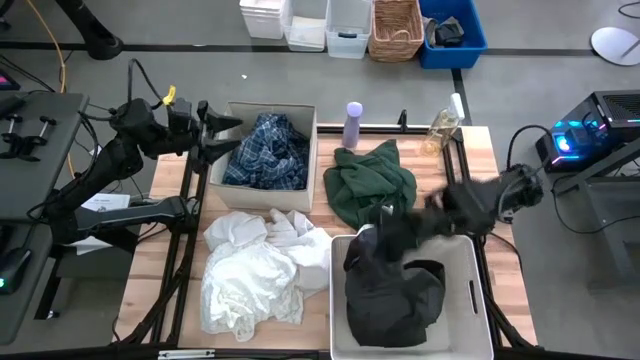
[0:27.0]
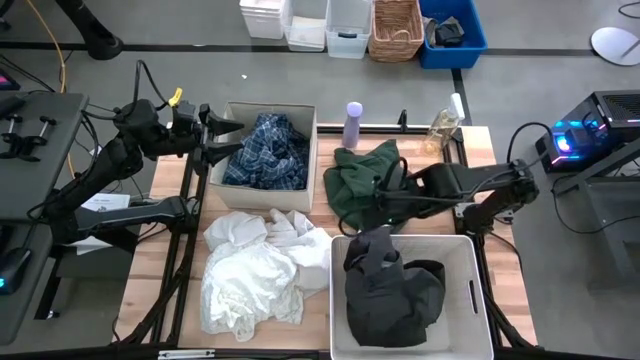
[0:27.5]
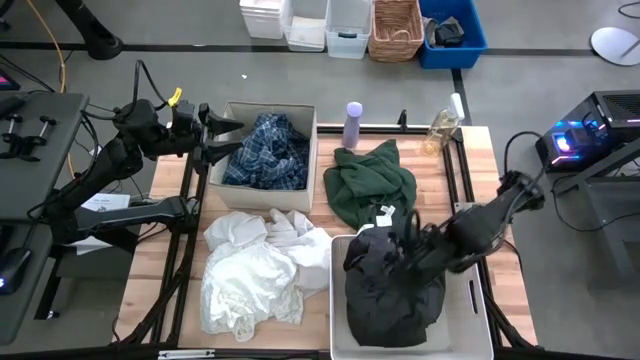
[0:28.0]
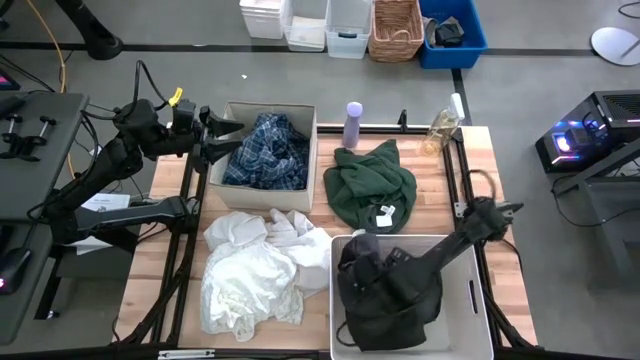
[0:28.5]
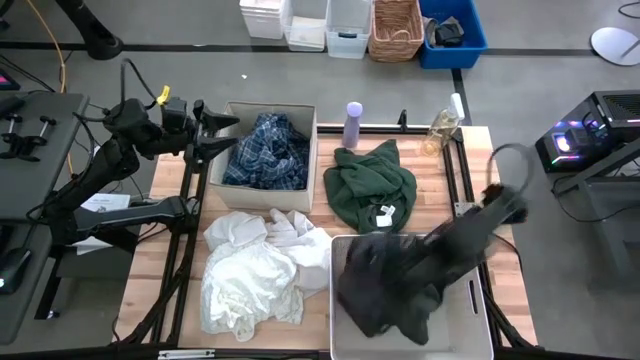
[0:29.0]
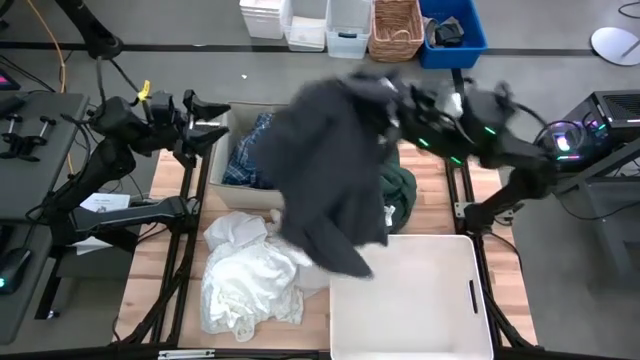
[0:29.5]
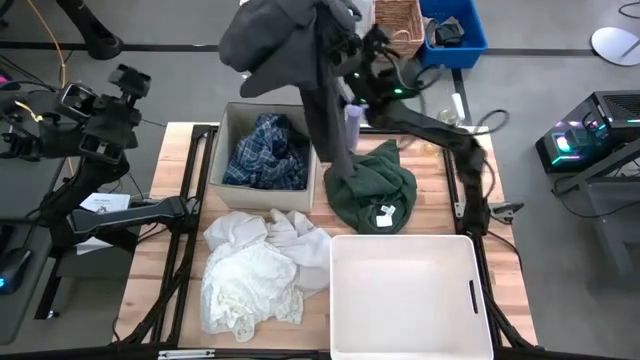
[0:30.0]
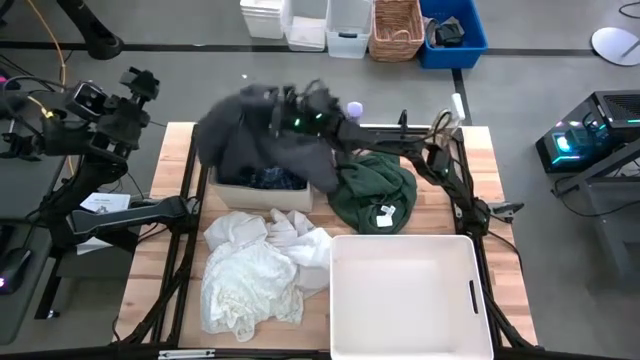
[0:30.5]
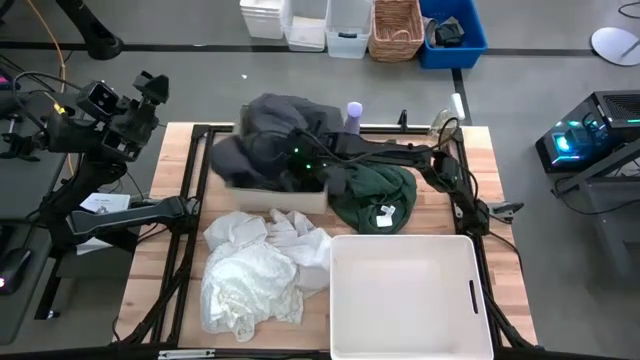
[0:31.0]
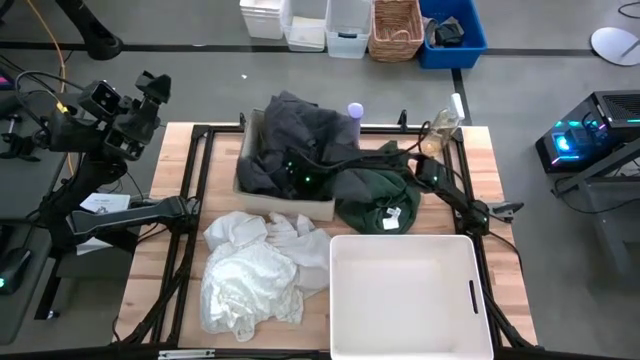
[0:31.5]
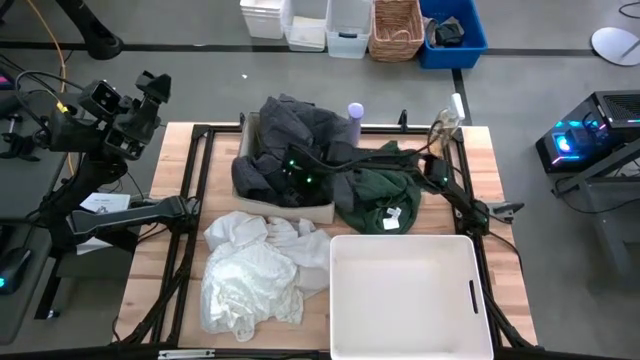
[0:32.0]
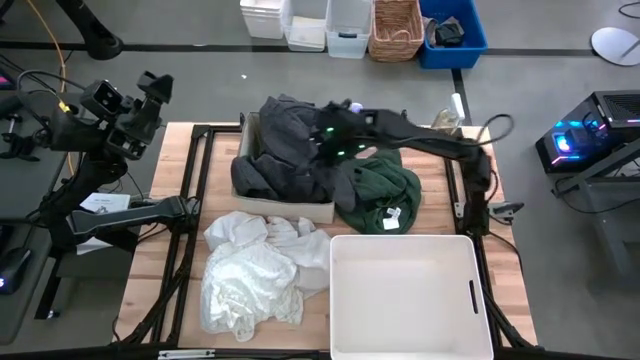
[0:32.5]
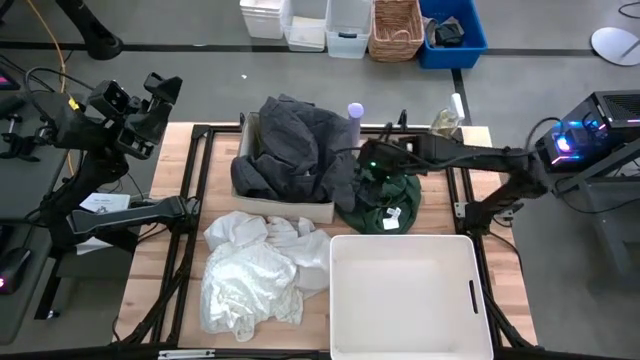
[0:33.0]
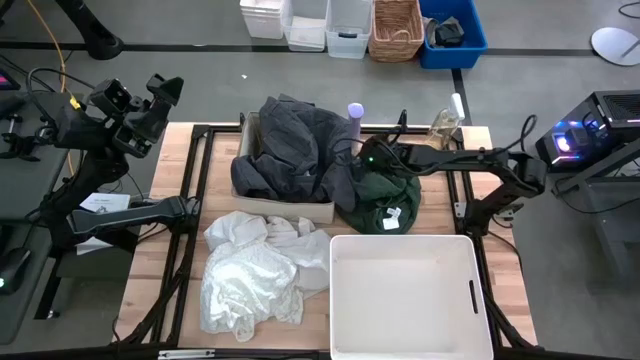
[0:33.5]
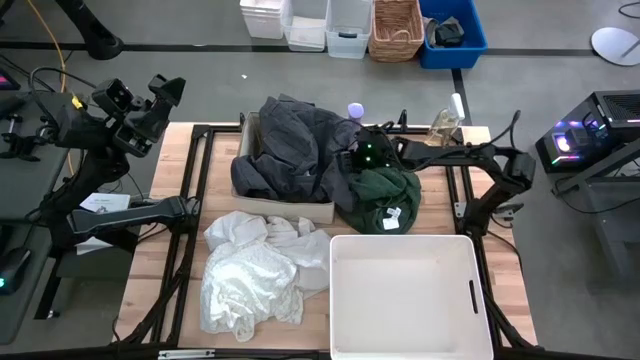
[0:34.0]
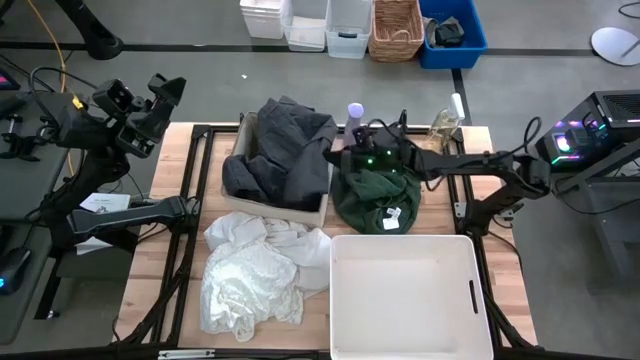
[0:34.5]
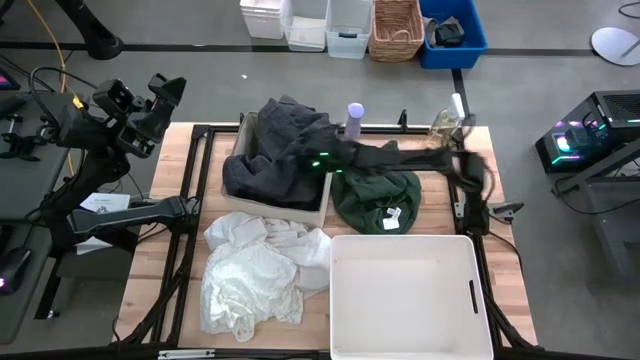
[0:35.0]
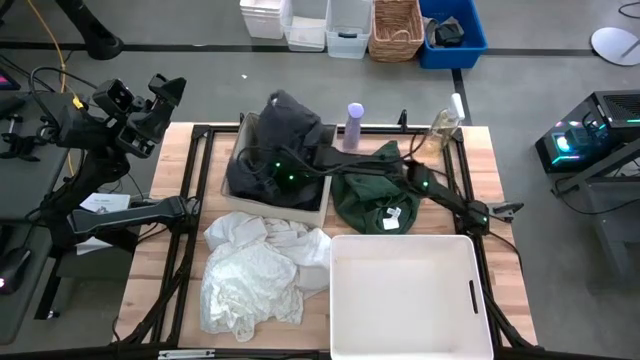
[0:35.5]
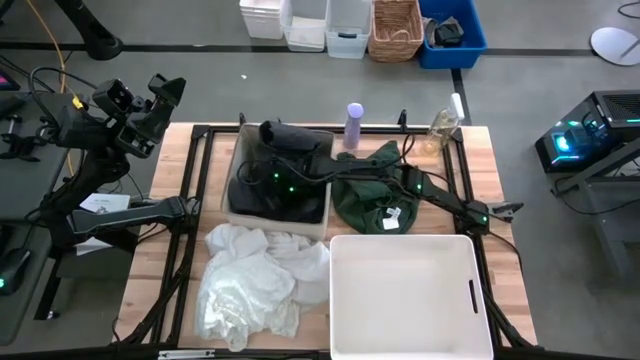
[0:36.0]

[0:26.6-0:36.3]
Task: Sort clothes
Move the gray long pants from the white bin into the gray bin

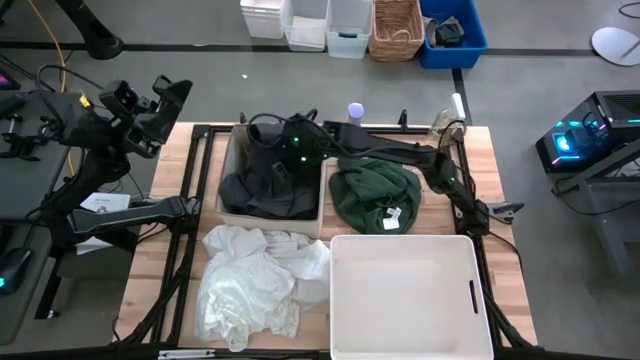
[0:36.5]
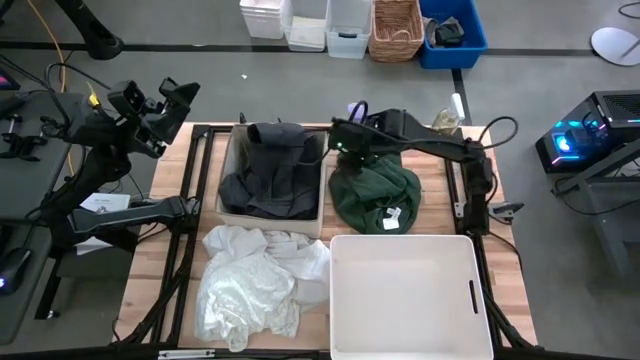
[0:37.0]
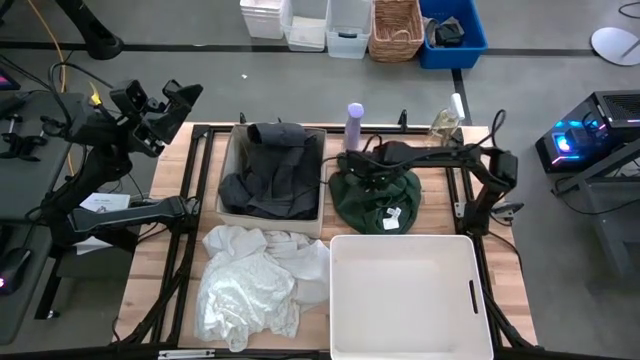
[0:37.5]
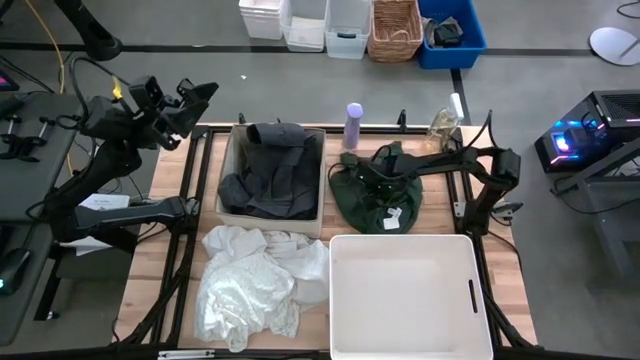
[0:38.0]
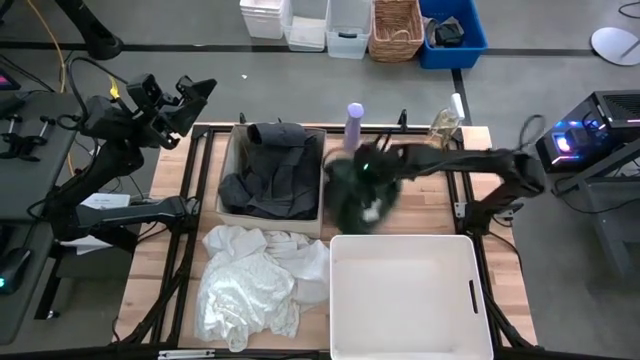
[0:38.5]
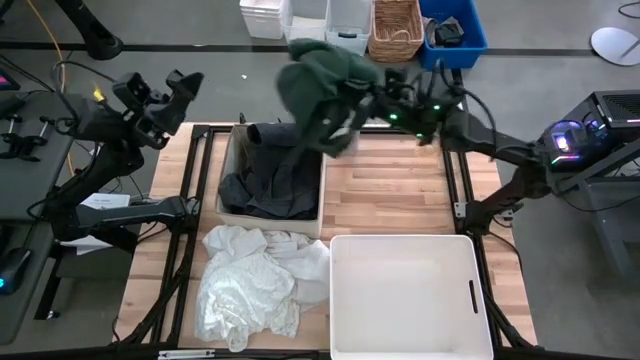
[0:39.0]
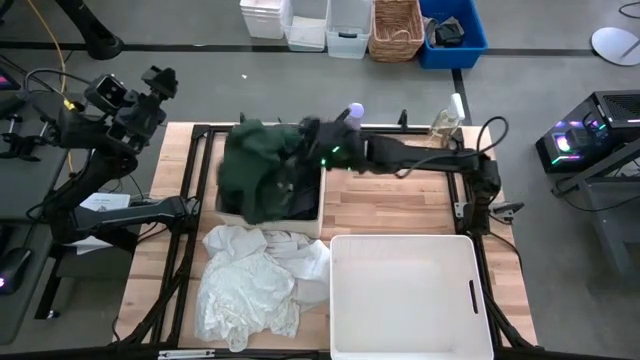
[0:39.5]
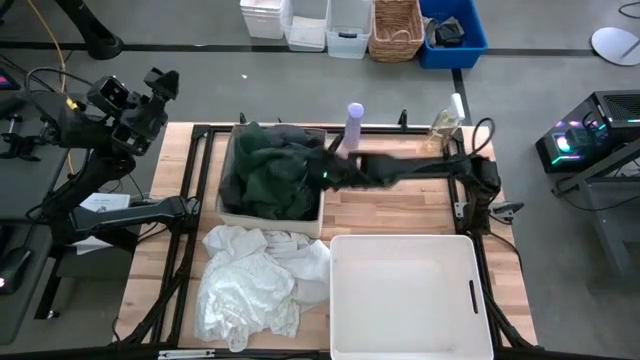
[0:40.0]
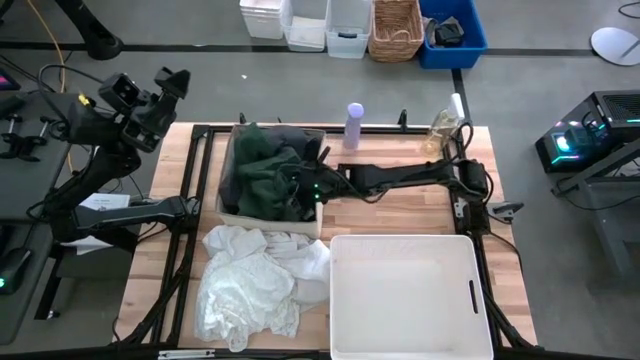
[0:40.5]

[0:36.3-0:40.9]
Put the green cloth into the gray bin

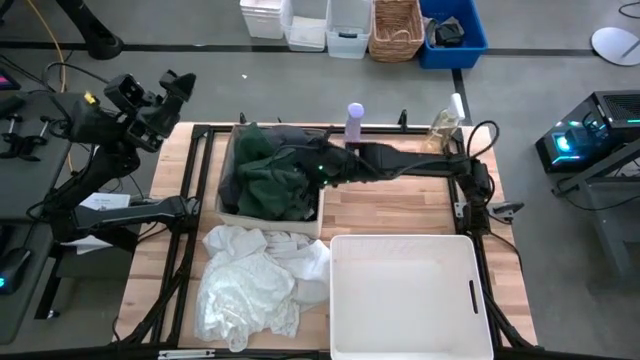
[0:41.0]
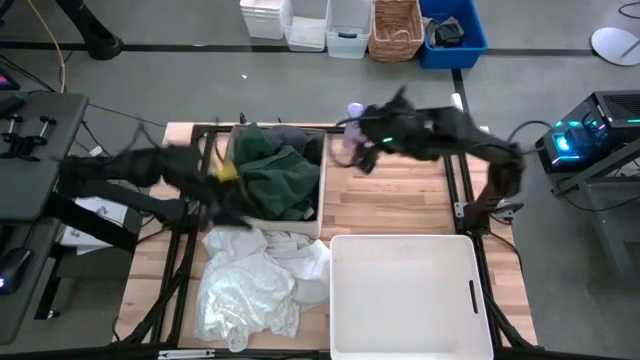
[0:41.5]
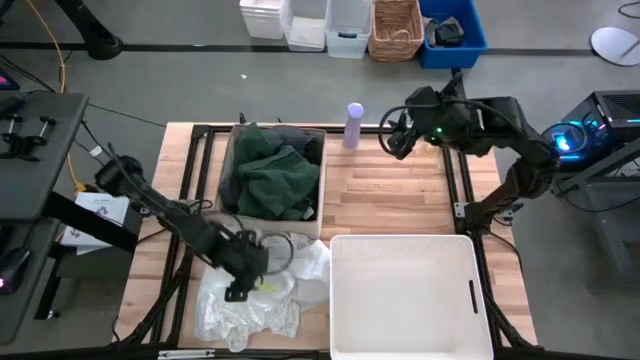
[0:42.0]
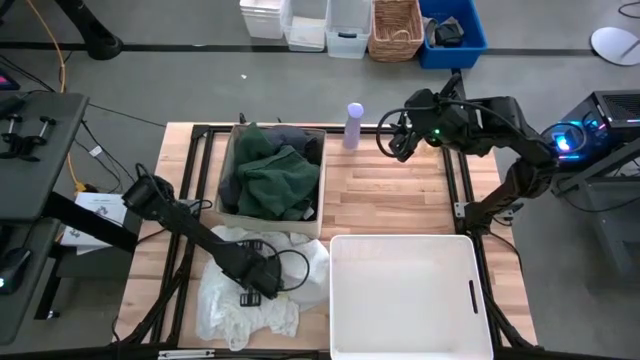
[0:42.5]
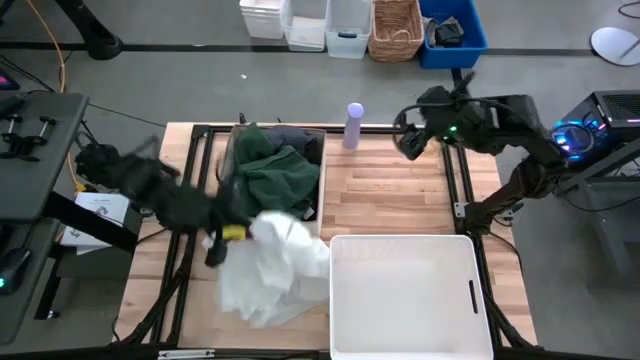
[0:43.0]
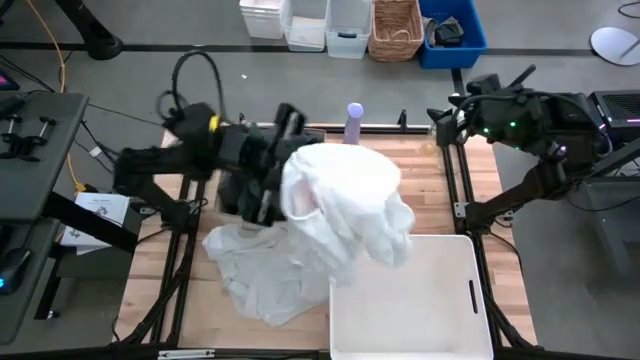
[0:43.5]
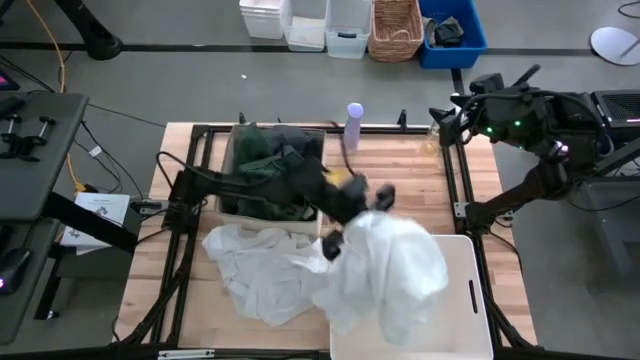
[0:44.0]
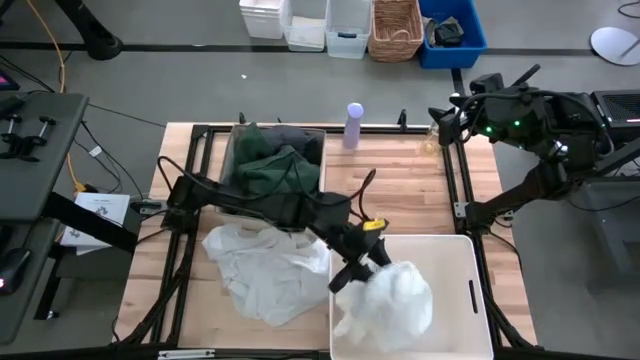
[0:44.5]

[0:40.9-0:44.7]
Put the white cloth into the white bin

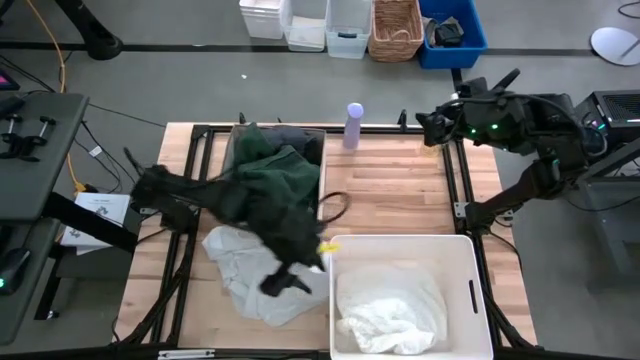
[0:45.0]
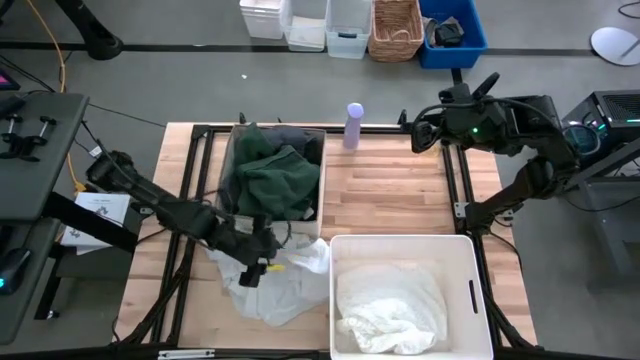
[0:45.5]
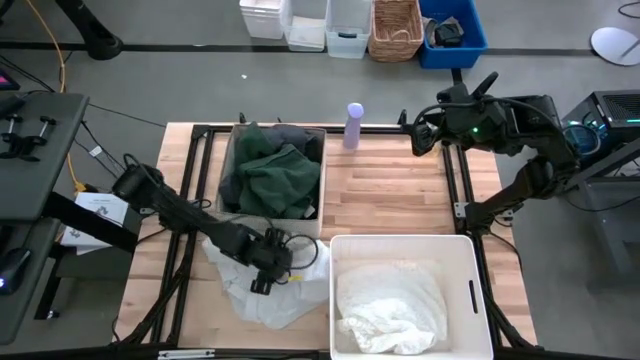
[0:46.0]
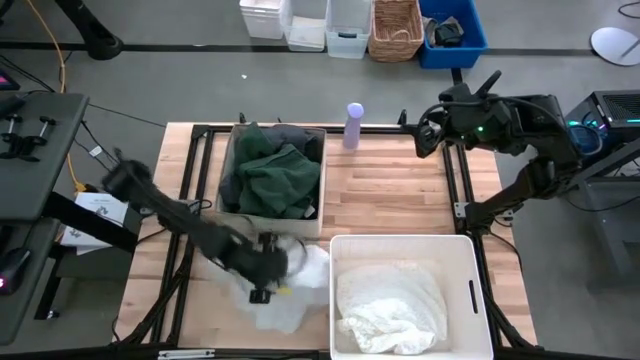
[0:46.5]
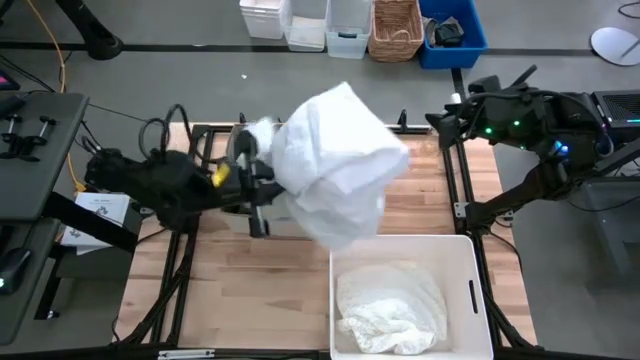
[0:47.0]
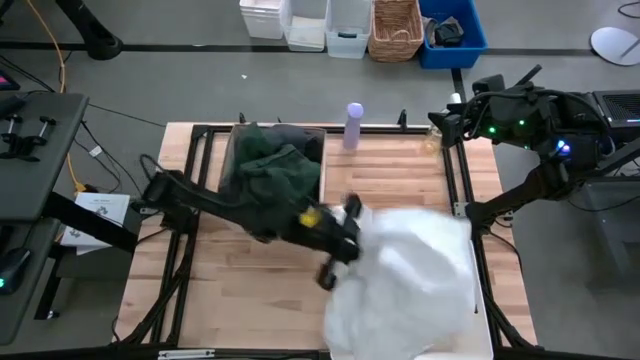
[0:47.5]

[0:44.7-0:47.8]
Put the white cloth into the white bin
